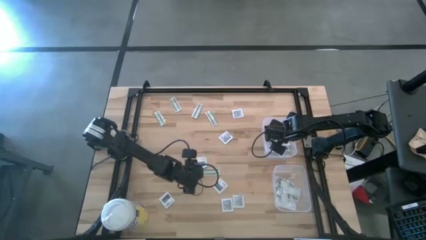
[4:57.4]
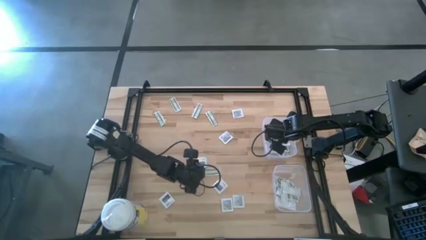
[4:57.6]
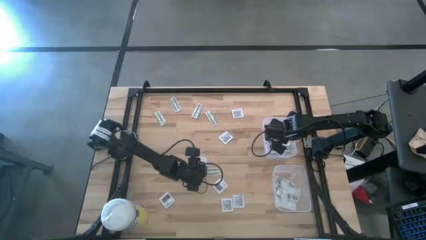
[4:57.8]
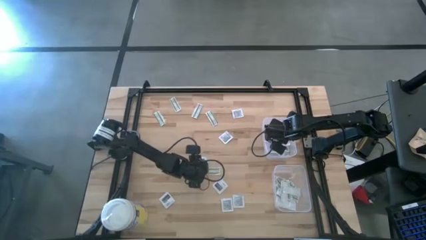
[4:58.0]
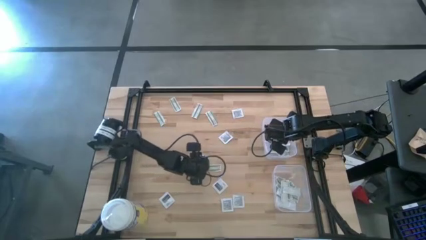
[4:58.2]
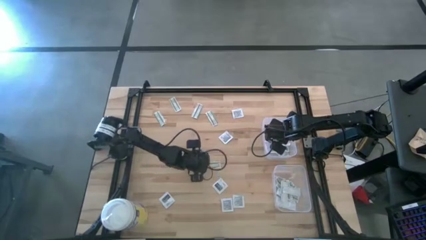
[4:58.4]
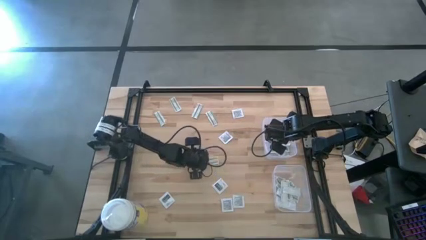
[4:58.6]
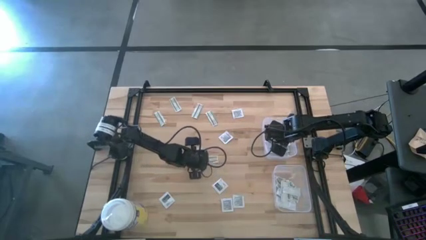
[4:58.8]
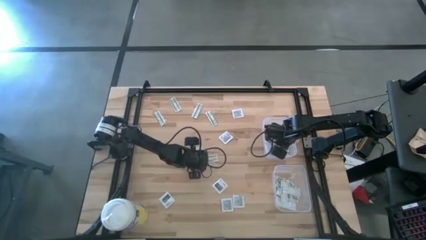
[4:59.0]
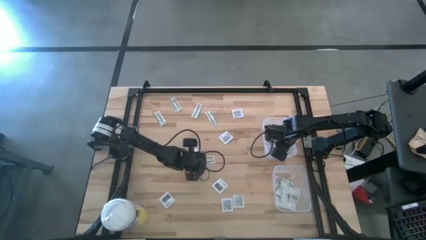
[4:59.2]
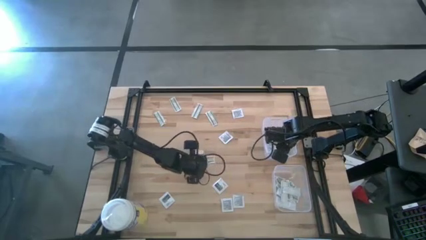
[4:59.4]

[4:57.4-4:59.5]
Task: Pick & Place First Aid Supplies
Put the towelette pack into the top bin

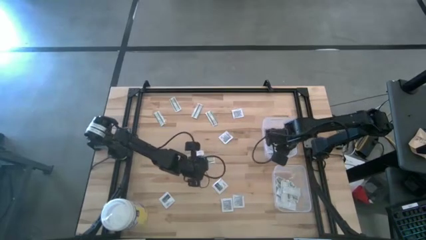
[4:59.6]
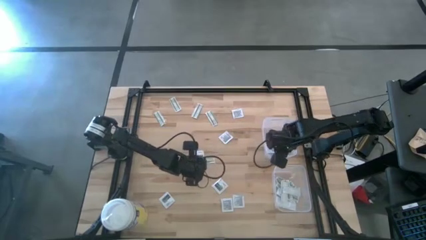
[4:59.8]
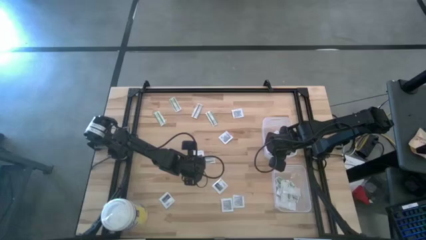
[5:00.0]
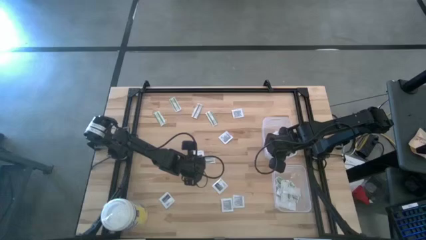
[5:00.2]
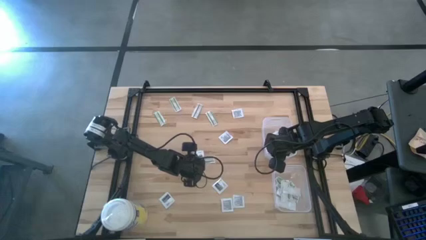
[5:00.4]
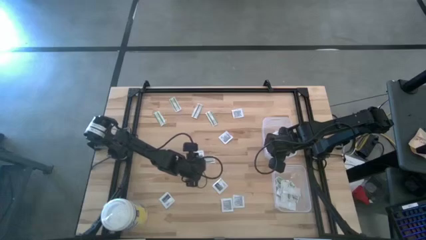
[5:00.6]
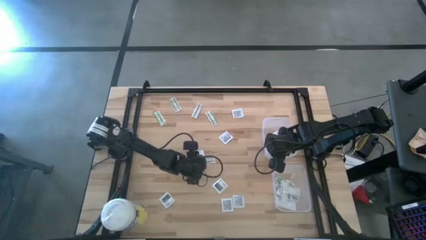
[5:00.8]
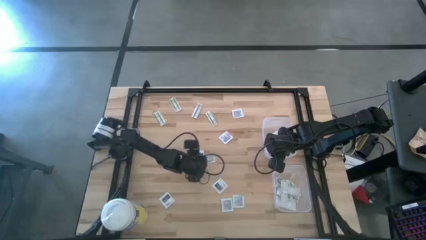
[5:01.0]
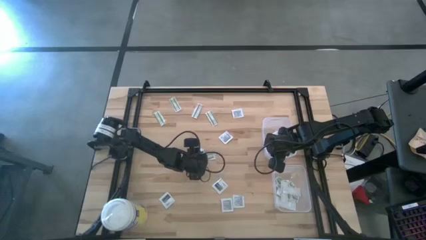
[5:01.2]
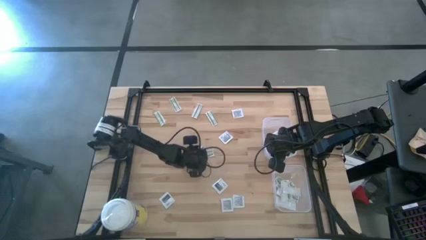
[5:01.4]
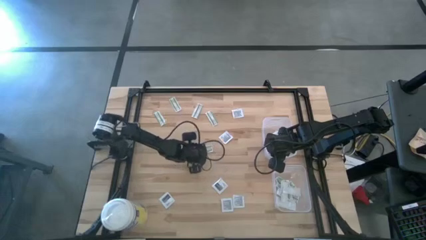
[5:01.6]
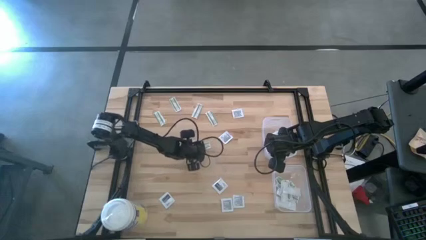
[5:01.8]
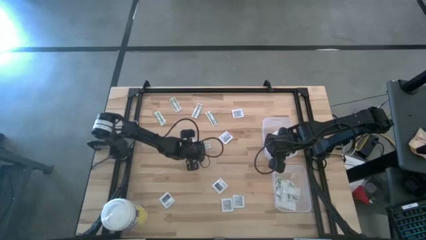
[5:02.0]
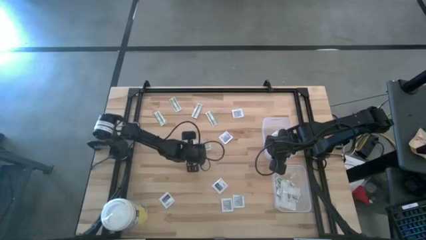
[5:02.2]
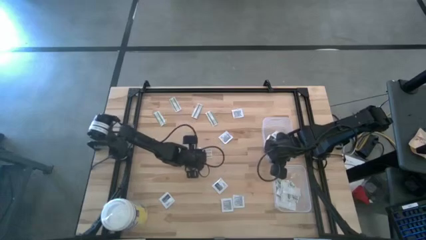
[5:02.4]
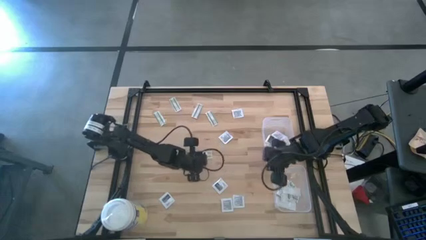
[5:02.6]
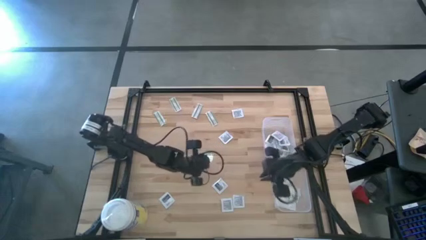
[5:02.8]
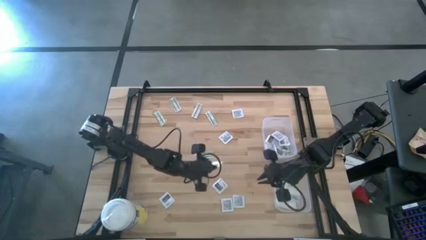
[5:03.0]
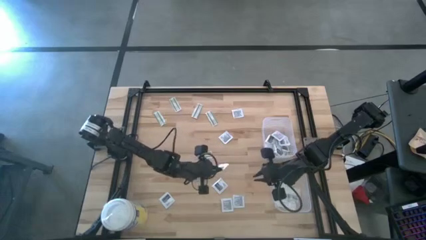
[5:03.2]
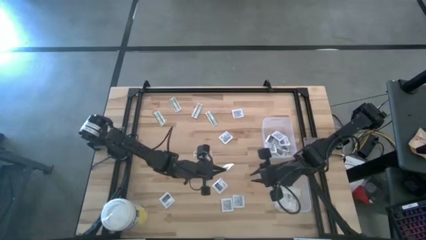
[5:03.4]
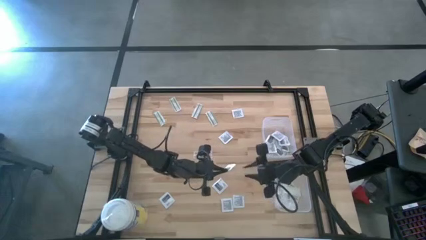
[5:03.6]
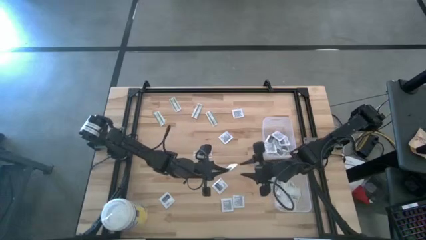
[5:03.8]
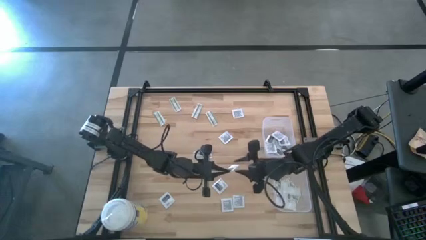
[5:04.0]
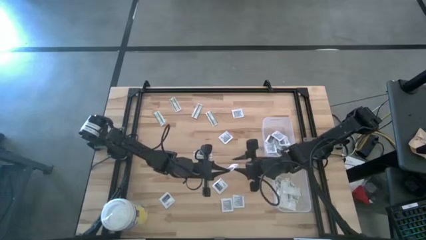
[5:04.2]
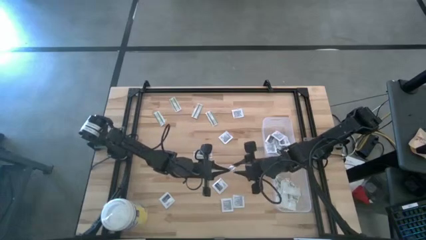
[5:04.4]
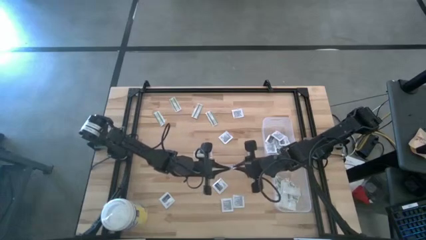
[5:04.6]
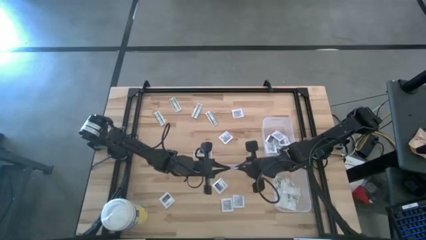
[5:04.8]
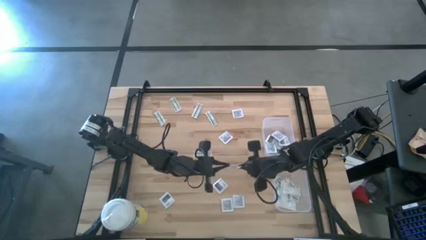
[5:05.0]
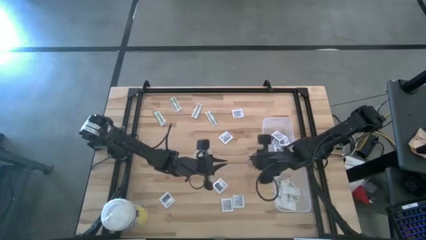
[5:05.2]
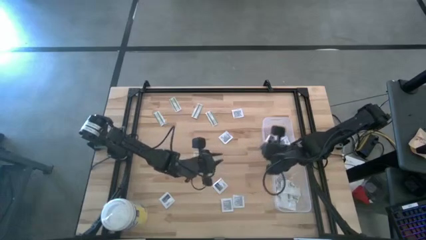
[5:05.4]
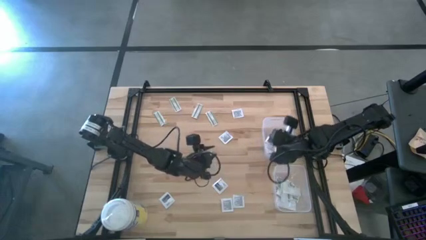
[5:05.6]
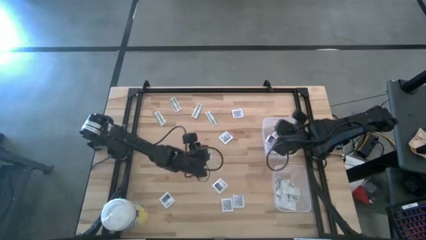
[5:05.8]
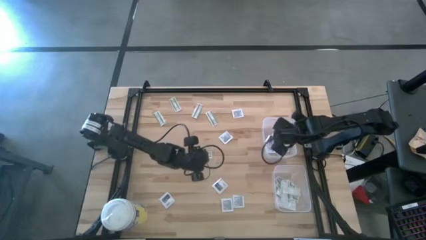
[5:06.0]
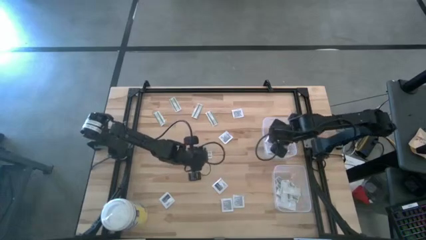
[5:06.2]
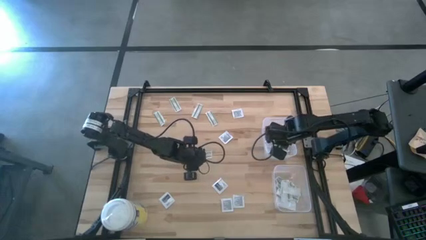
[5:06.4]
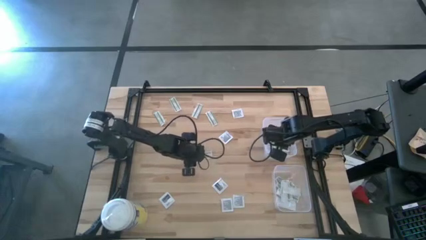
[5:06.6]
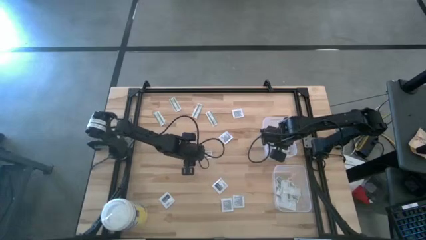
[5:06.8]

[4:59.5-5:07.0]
Put the towelette pack into the top bin

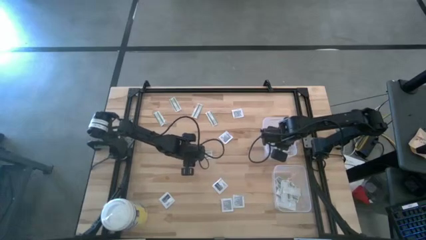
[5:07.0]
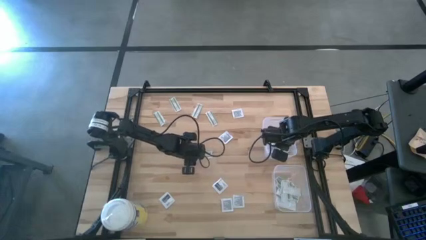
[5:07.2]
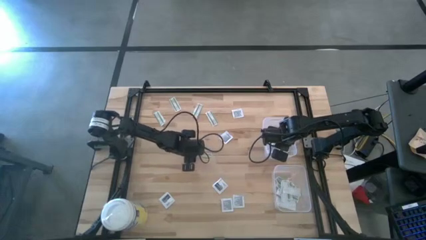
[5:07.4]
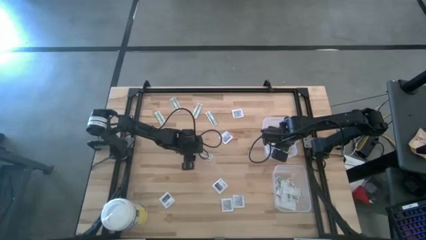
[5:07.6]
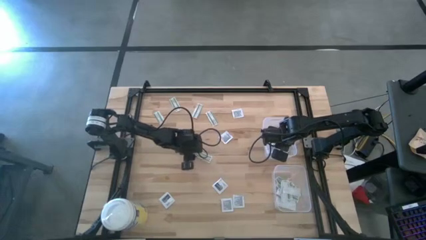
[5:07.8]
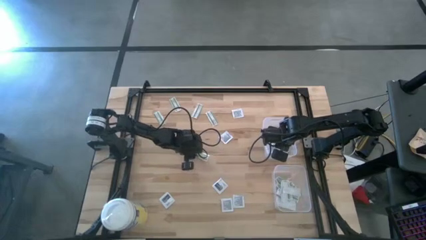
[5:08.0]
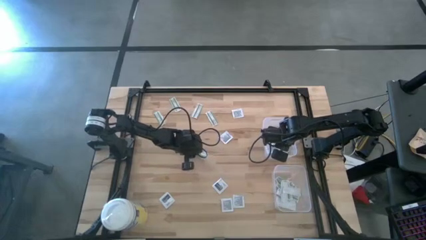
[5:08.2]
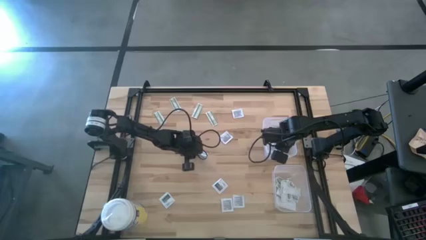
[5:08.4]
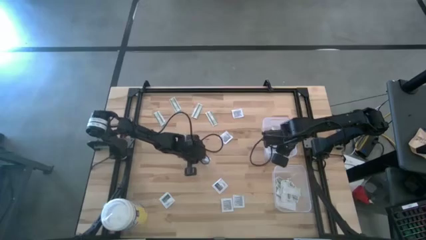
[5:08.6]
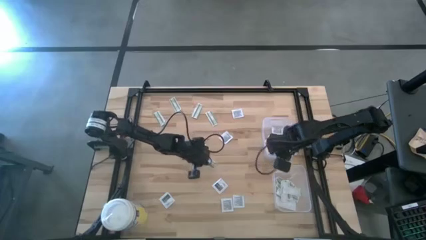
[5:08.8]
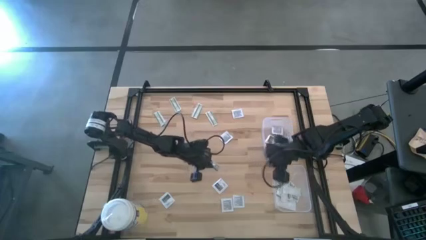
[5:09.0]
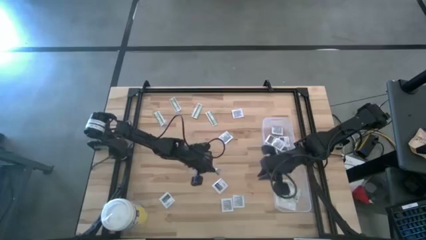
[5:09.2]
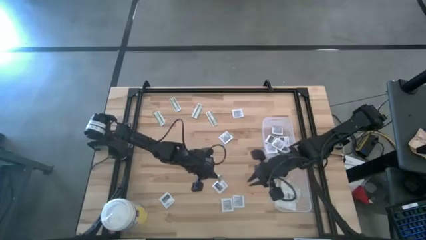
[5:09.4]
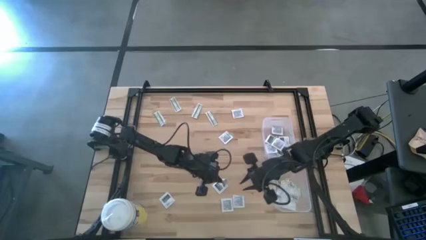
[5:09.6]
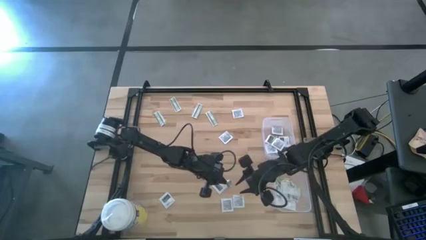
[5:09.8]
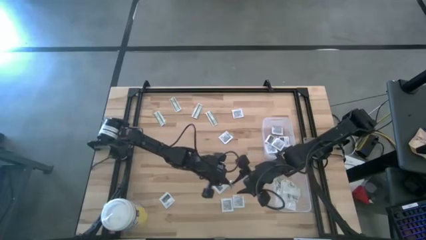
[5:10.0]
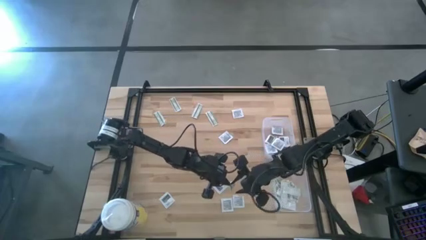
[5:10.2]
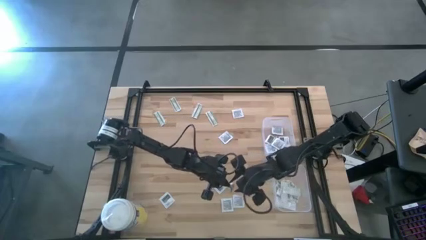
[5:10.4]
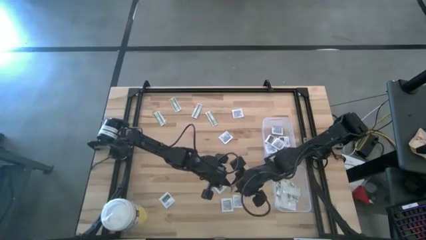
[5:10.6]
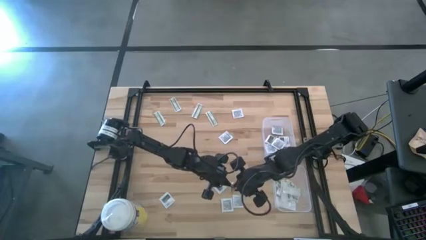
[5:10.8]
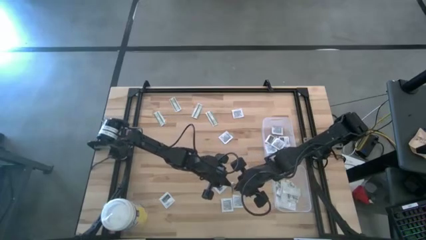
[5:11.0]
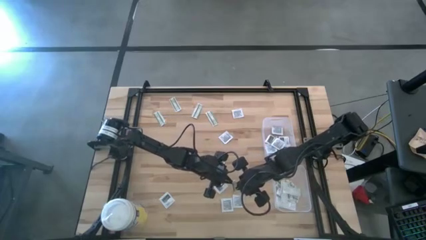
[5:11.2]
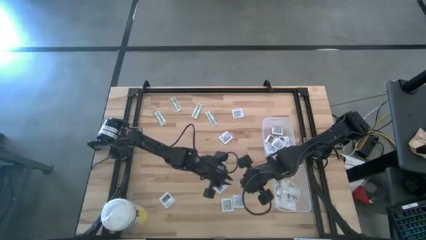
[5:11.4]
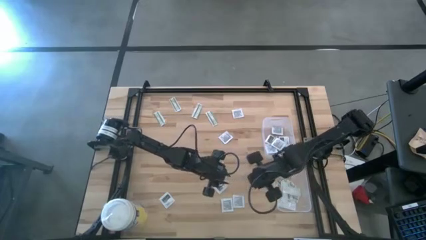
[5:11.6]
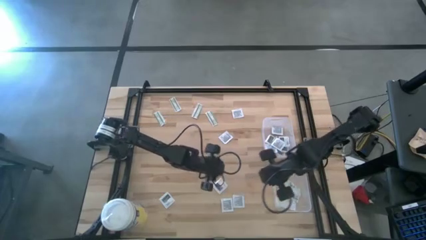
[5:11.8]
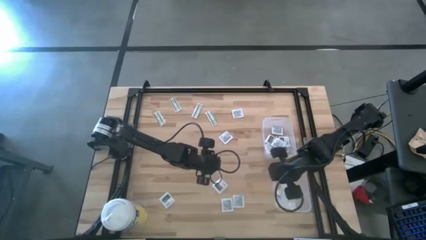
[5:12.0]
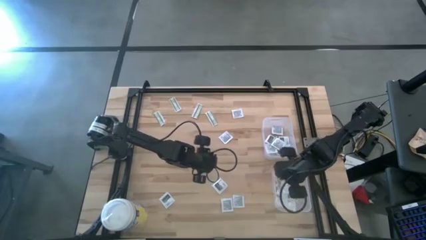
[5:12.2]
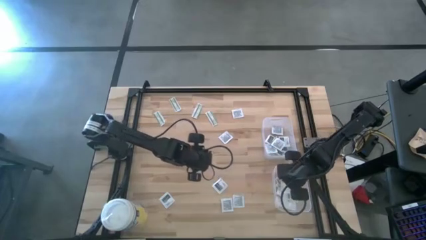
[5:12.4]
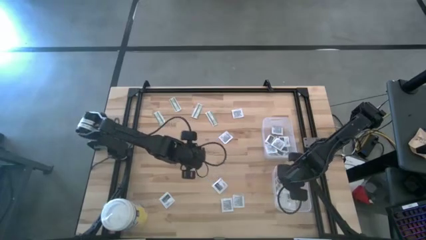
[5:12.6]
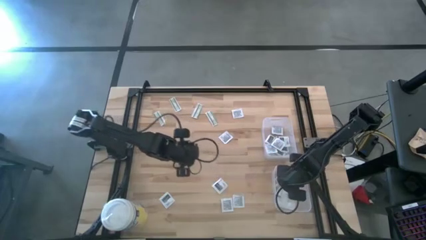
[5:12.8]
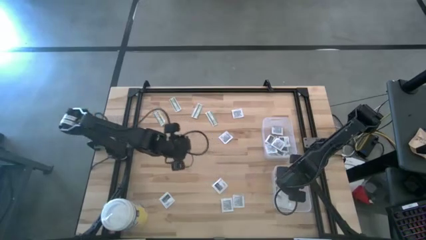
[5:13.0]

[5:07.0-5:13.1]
Put the bandage pack into the bottom bin
